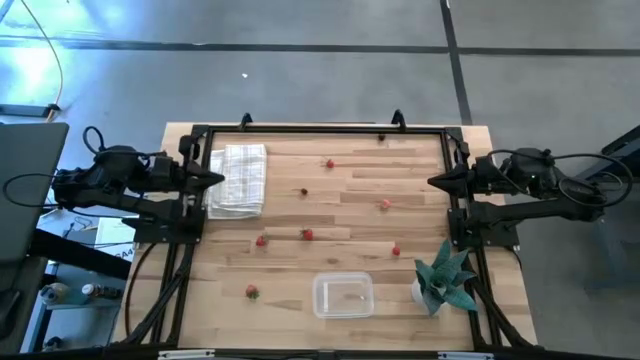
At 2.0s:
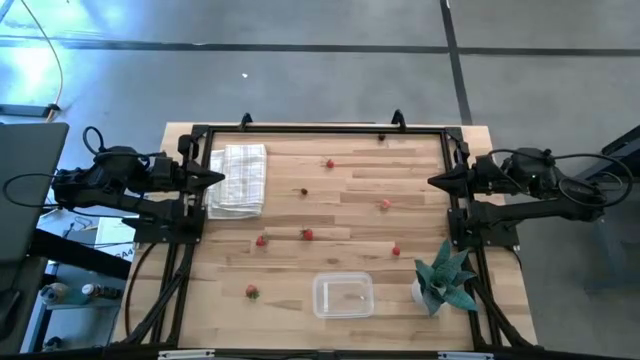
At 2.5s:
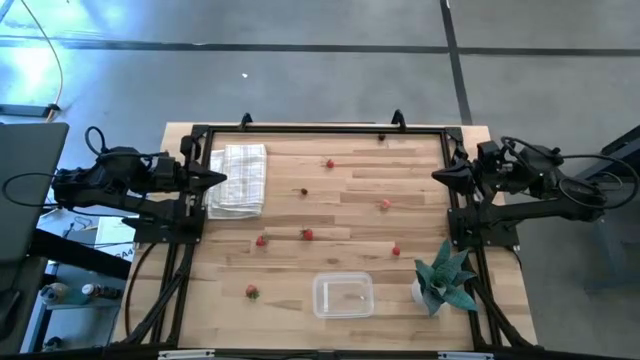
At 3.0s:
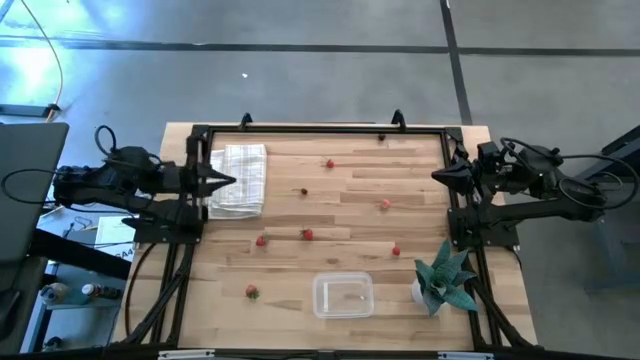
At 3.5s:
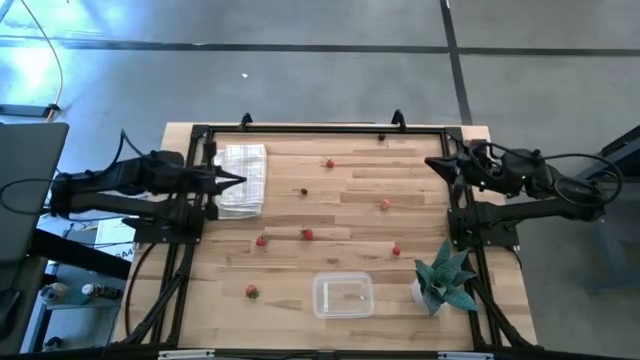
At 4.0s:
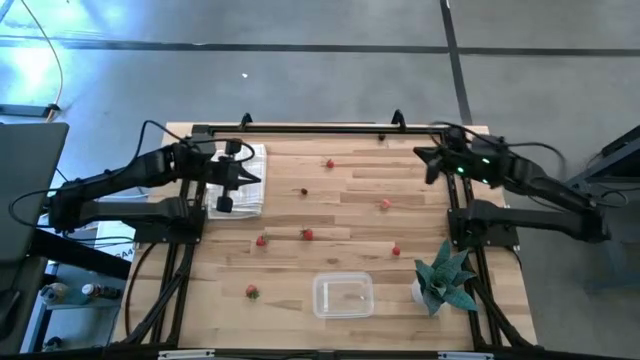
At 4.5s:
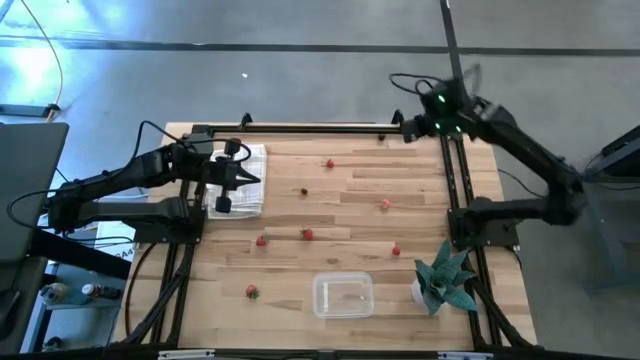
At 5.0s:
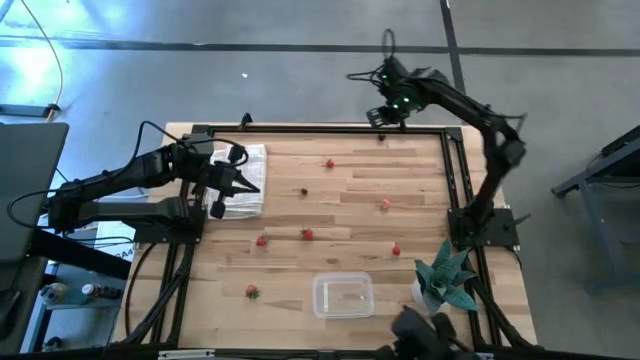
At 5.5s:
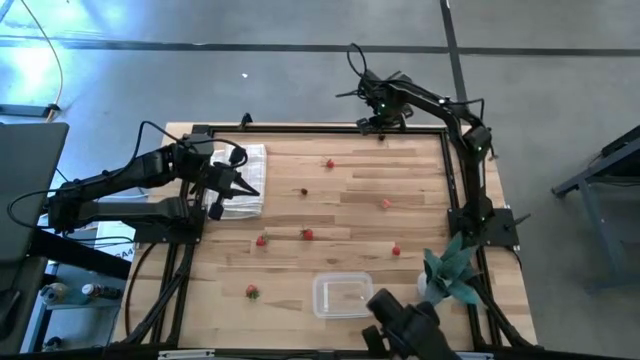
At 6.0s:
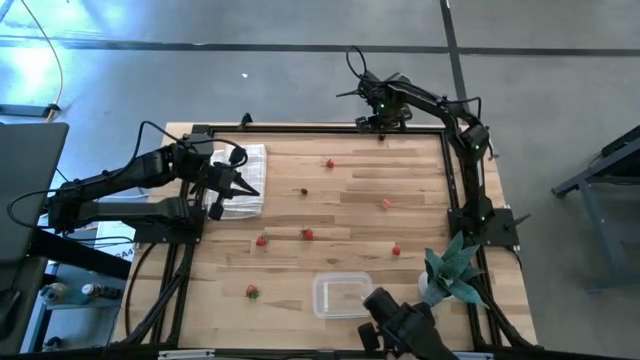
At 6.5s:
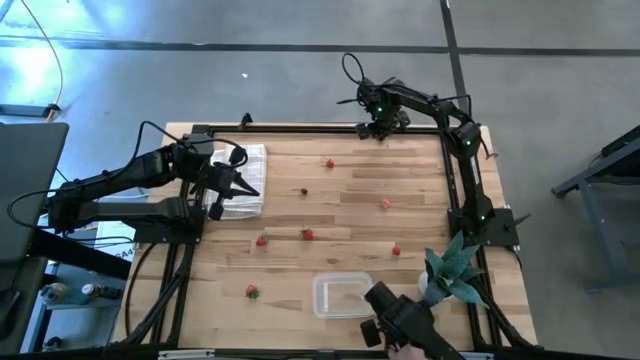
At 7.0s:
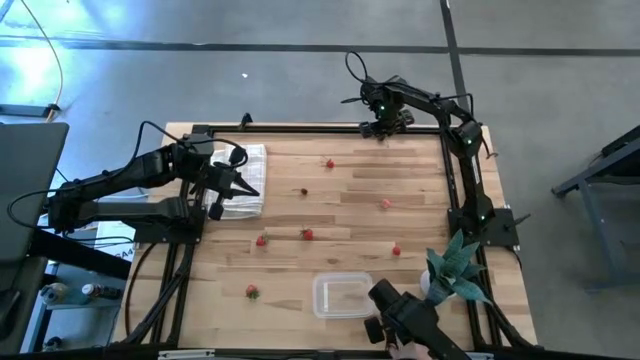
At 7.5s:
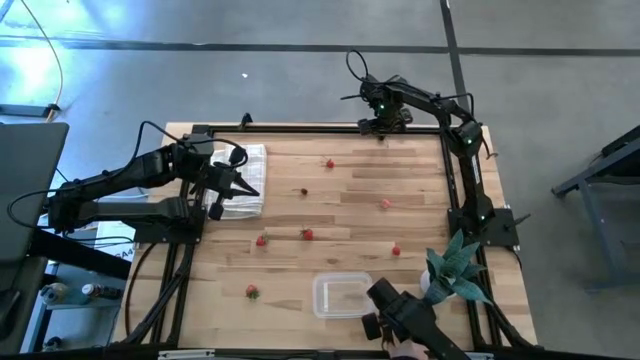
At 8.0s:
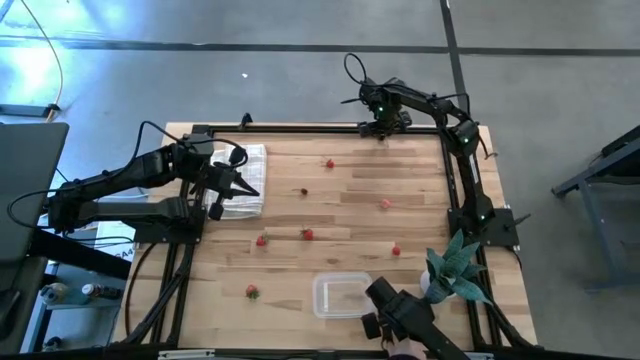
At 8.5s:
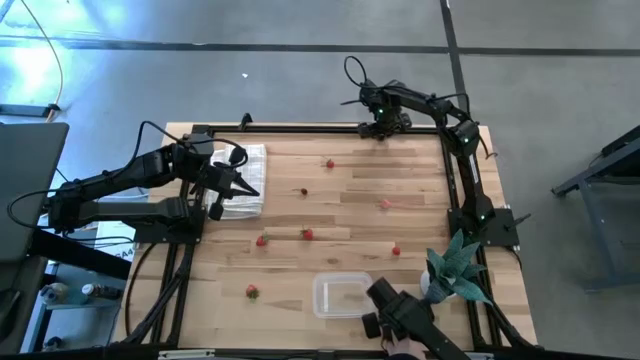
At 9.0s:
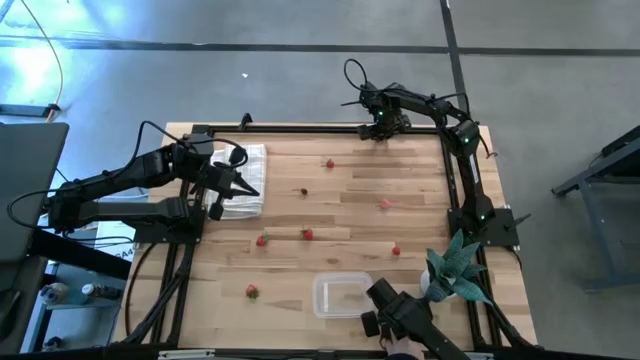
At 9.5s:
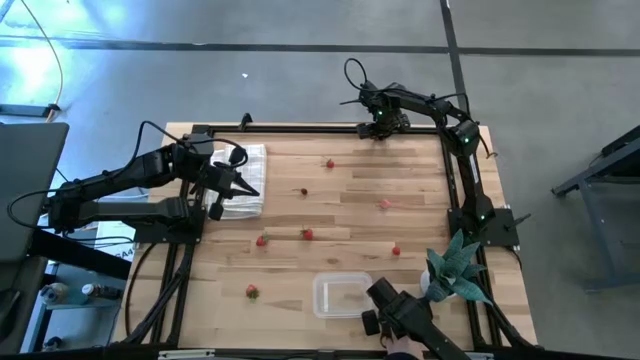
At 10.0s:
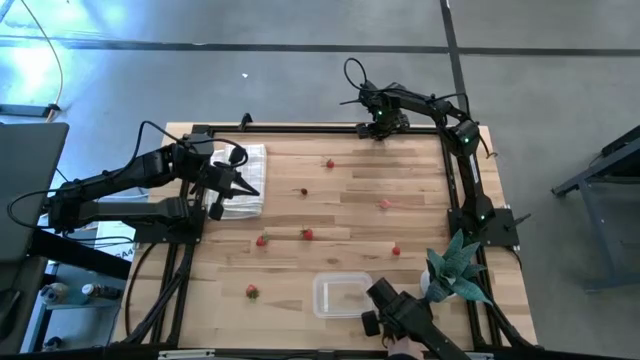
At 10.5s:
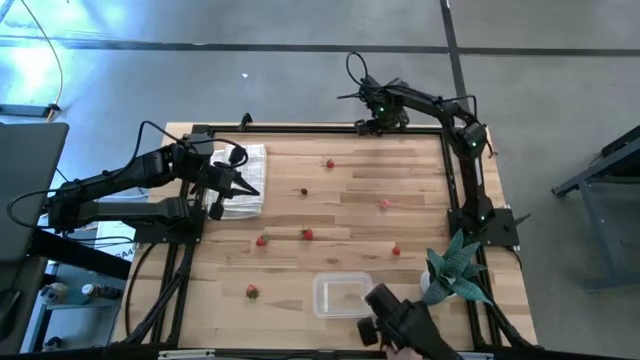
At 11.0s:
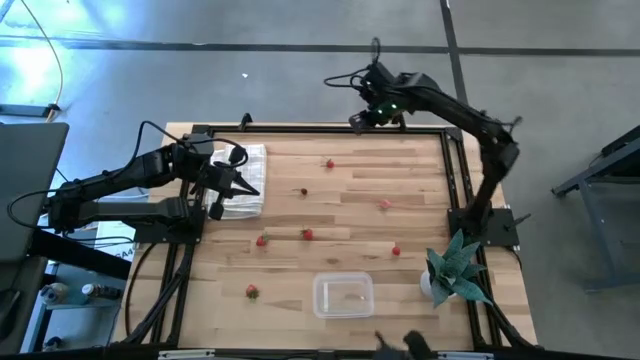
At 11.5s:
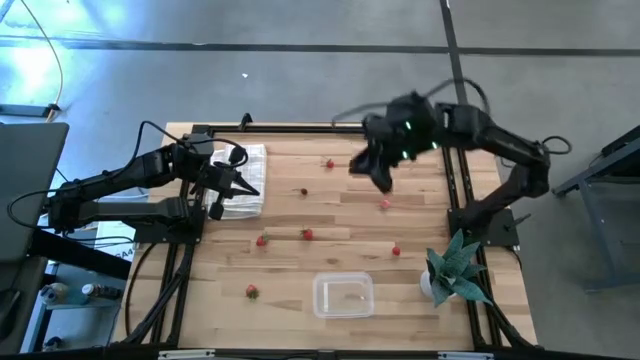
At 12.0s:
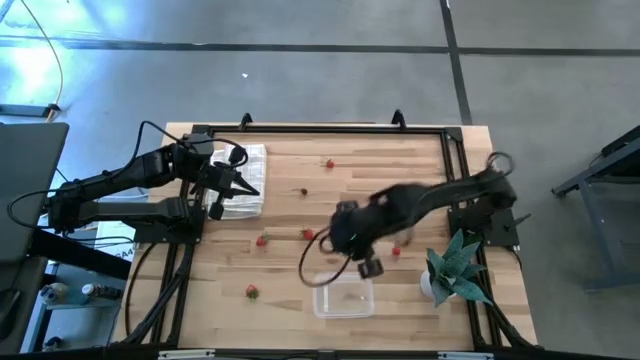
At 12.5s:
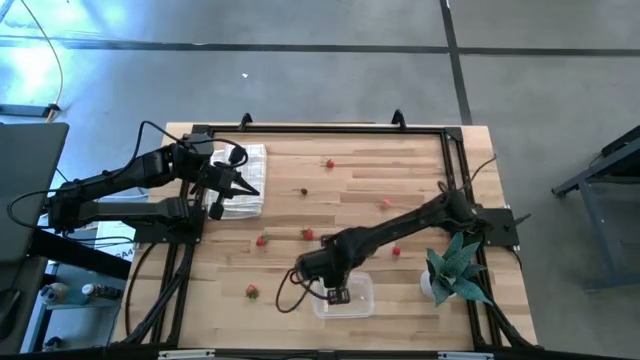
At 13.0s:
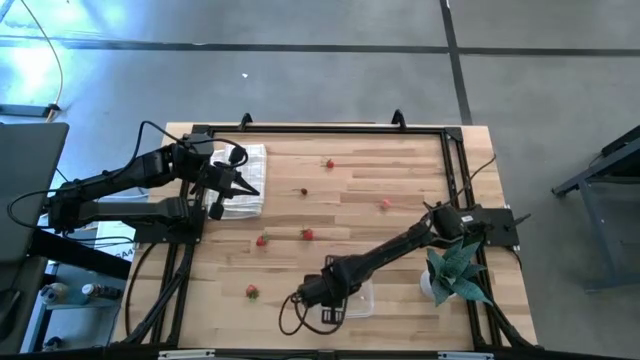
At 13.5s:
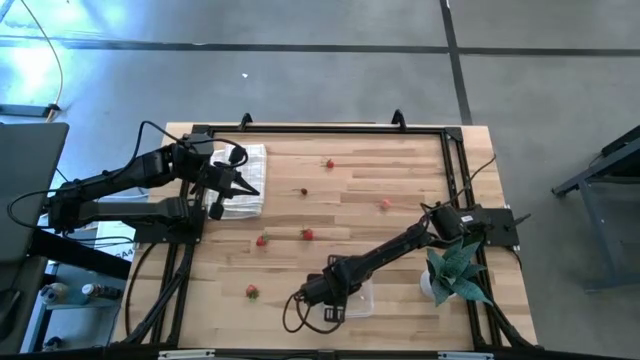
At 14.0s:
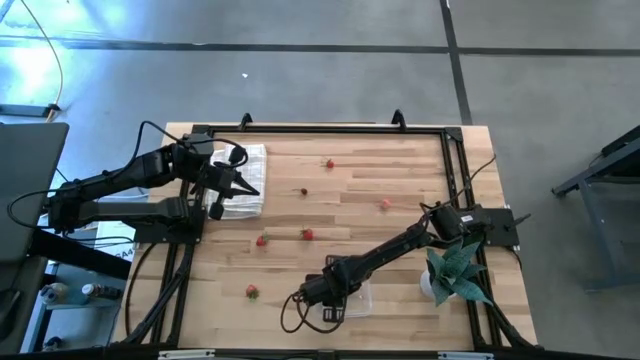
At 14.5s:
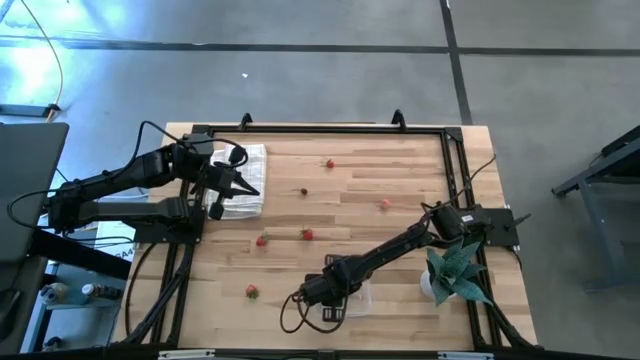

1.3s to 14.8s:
Task: Pick and placing Produce into tupperware
Put the black cherry into the transparent bin

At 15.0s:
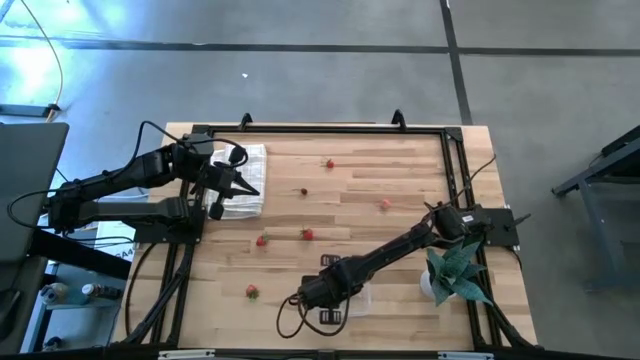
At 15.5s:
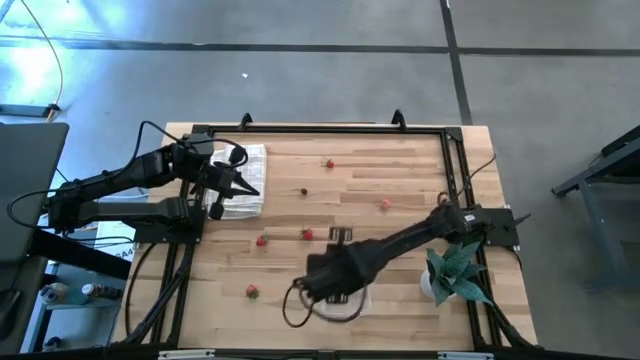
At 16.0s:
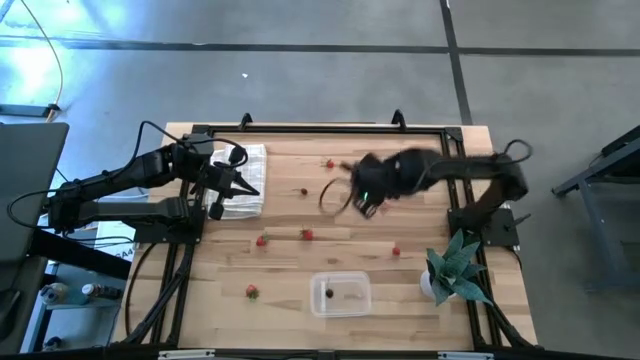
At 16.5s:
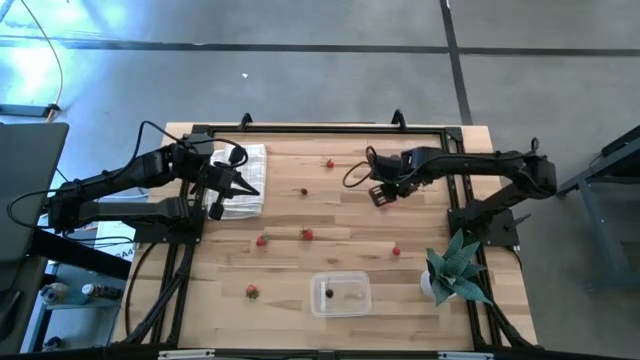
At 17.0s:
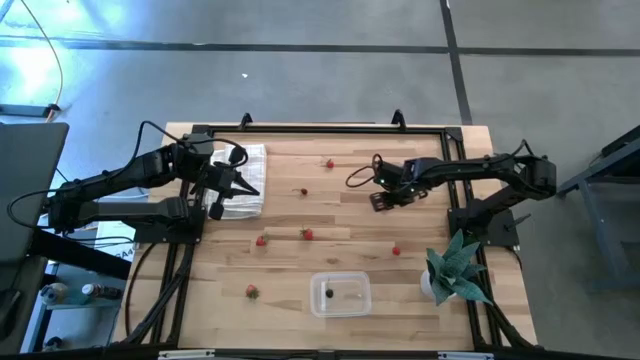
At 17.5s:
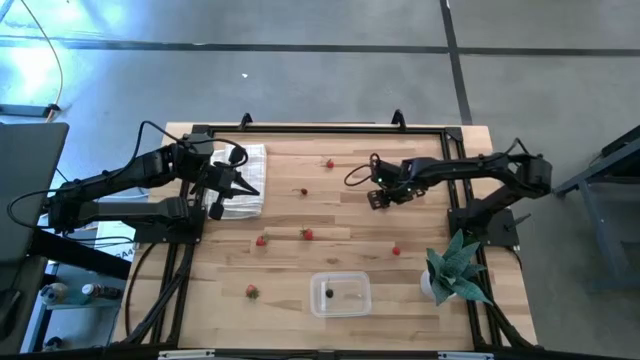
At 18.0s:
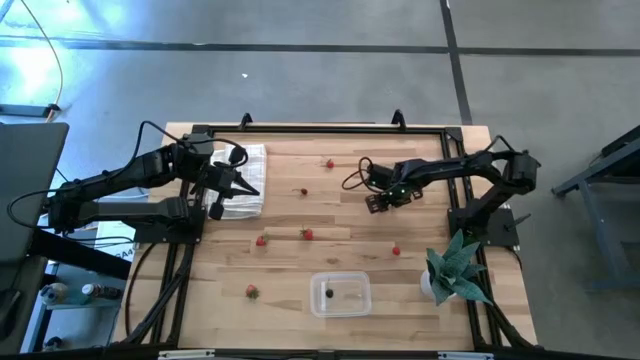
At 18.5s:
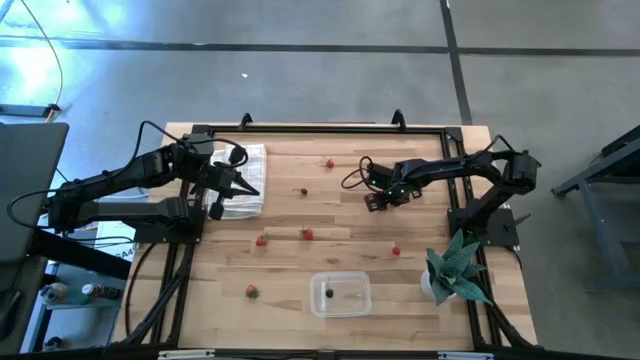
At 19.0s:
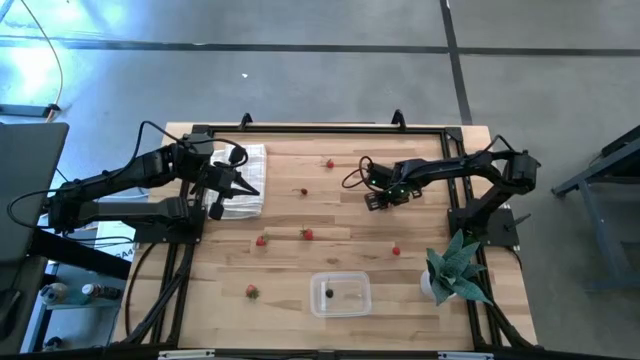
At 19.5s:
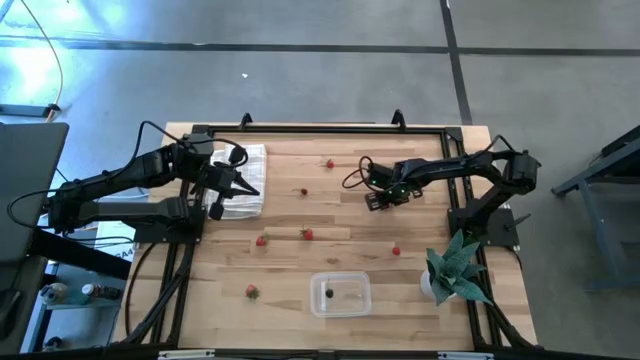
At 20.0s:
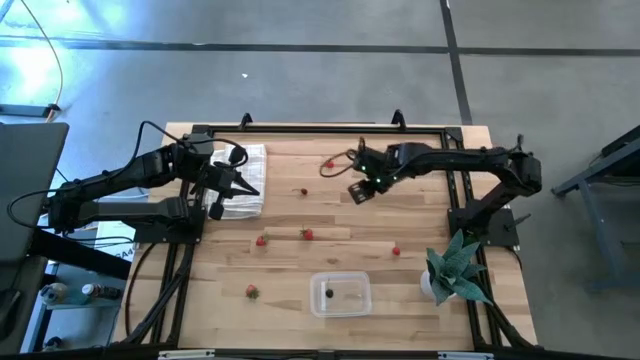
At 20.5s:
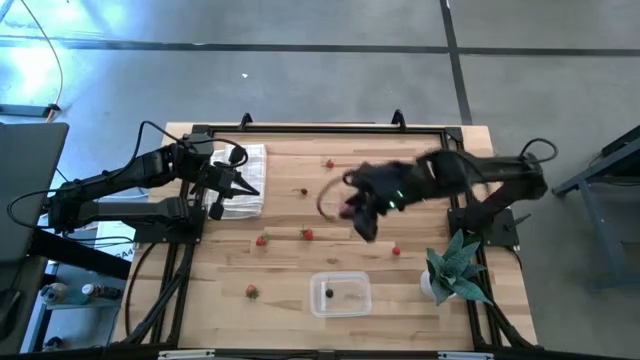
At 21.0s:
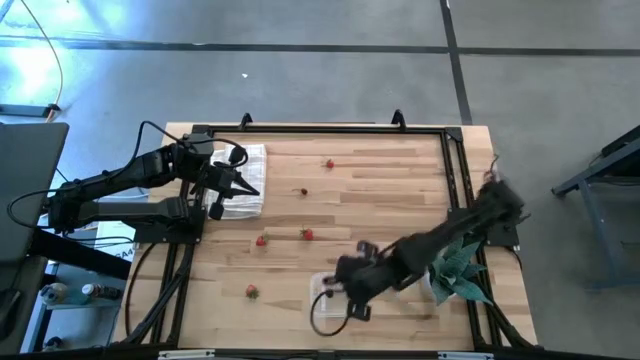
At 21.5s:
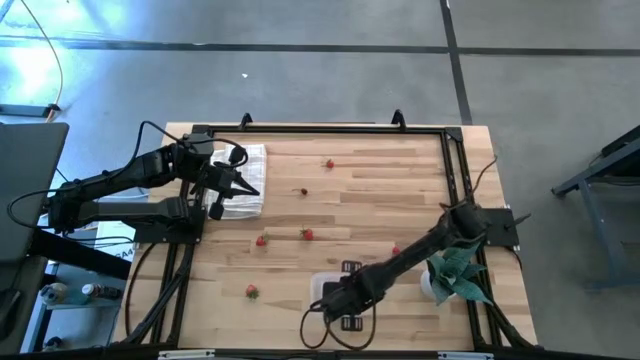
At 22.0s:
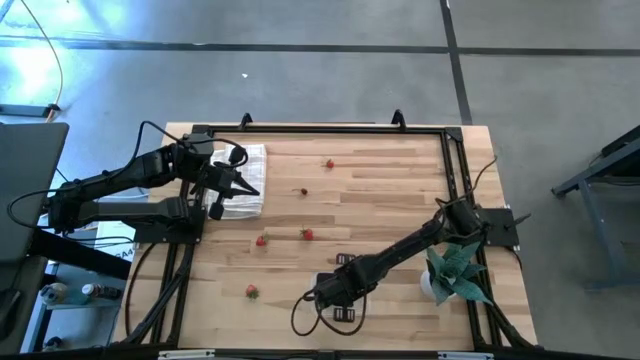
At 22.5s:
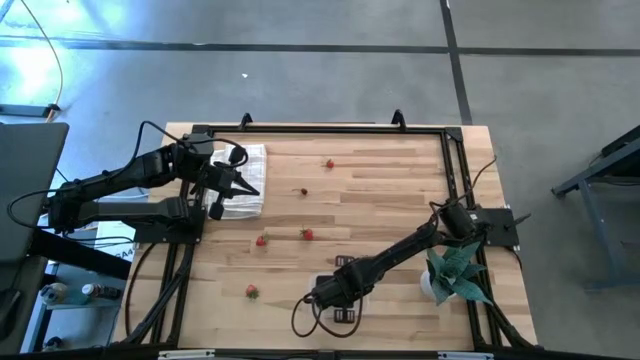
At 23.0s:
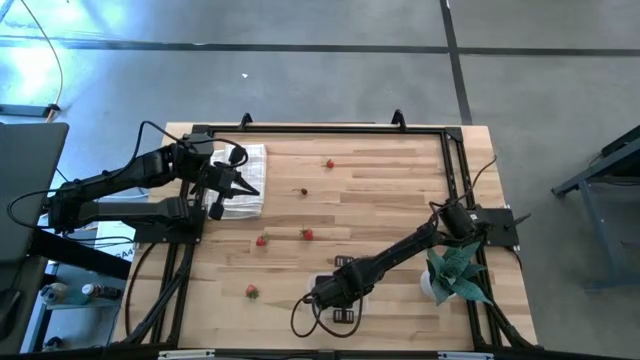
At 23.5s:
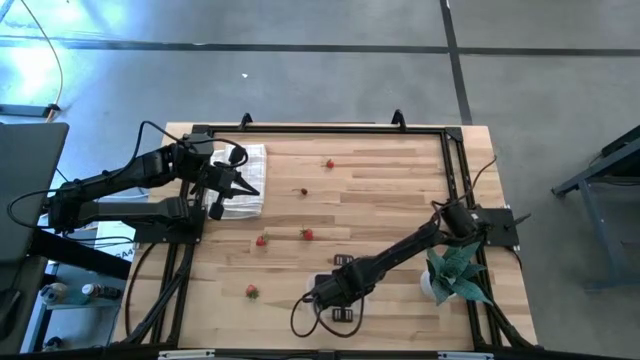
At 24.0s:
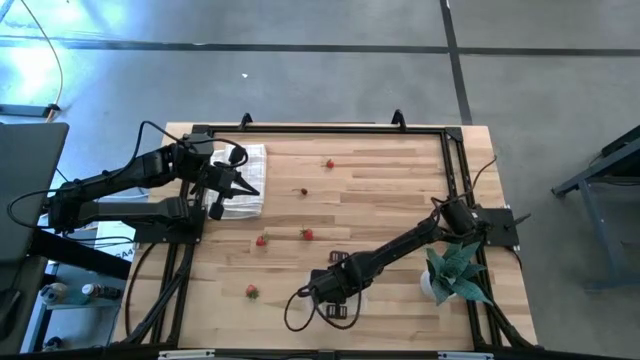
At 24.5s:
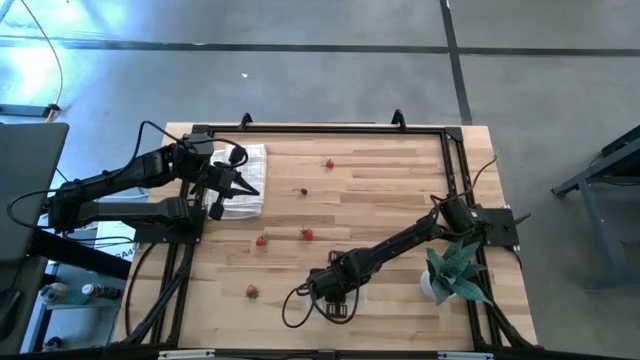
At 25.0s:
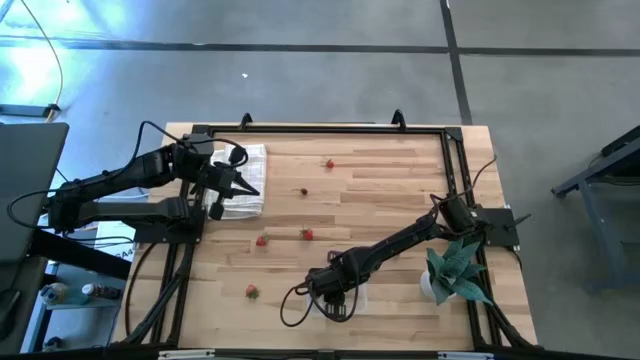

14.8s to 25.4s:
Put the pink peach into the transparent bin
